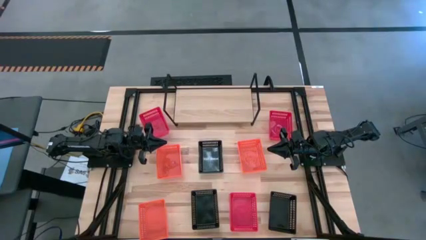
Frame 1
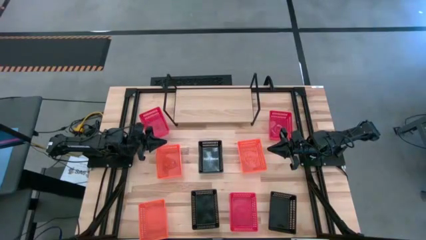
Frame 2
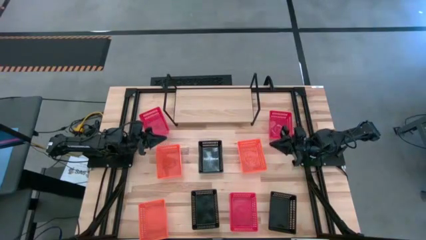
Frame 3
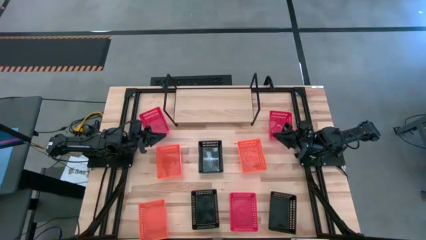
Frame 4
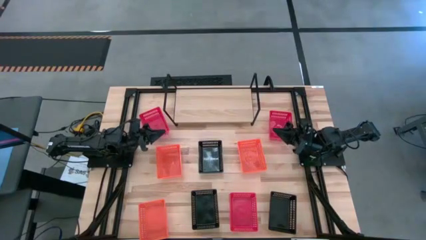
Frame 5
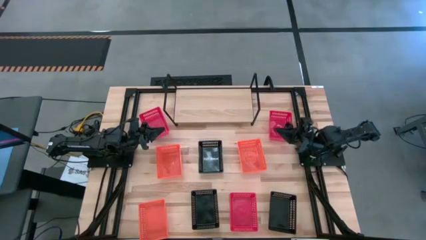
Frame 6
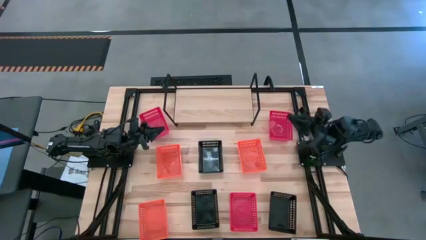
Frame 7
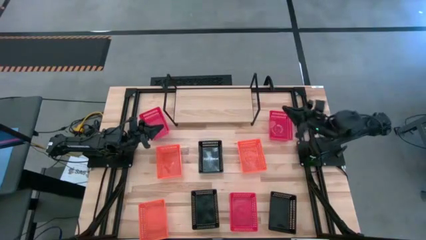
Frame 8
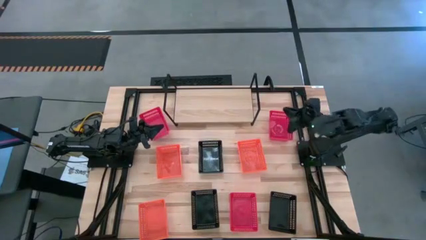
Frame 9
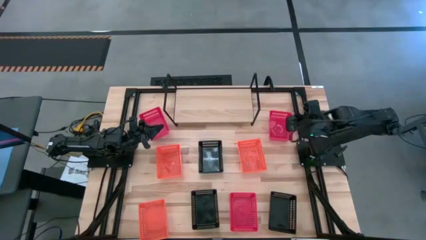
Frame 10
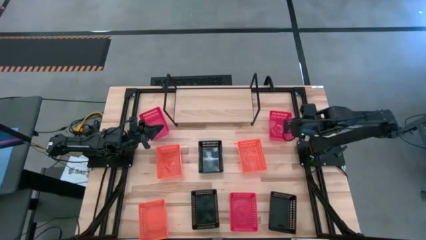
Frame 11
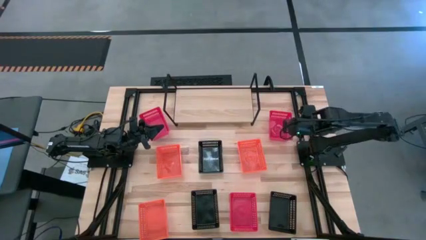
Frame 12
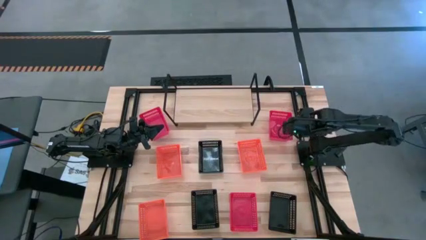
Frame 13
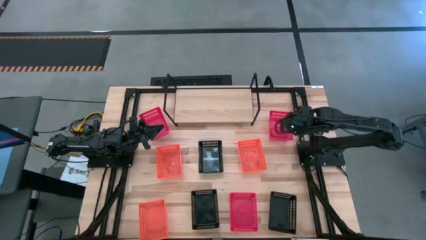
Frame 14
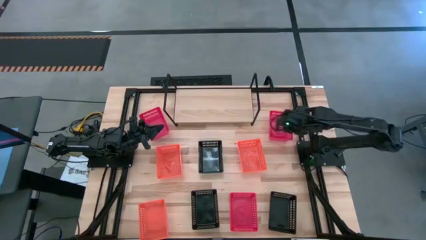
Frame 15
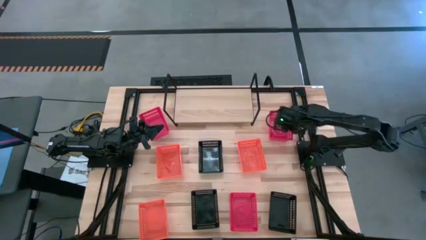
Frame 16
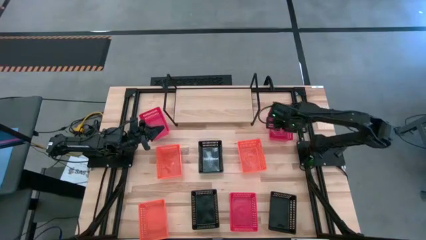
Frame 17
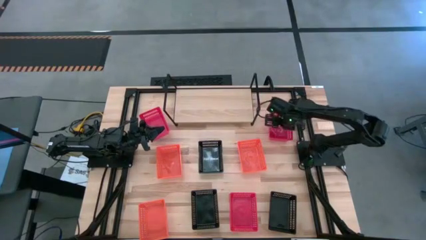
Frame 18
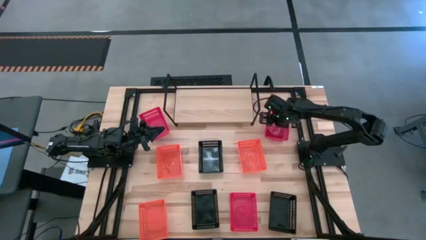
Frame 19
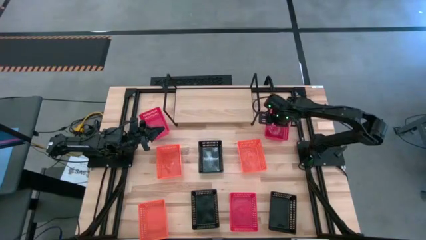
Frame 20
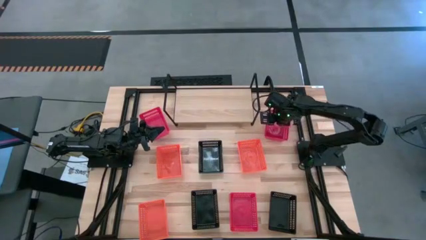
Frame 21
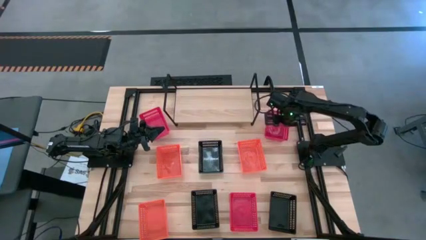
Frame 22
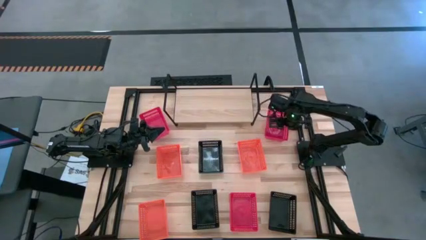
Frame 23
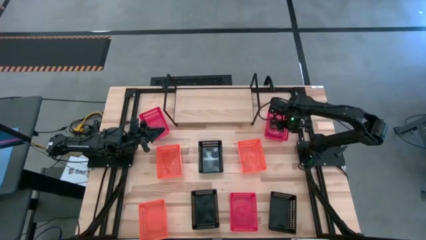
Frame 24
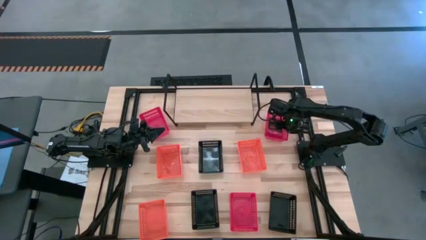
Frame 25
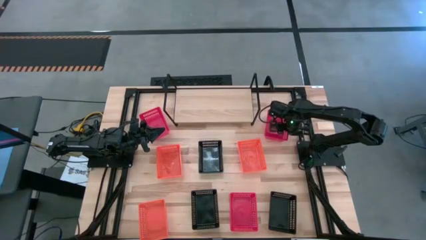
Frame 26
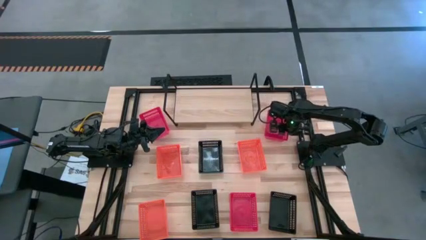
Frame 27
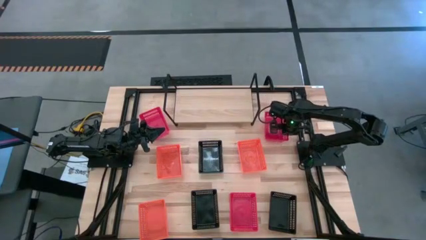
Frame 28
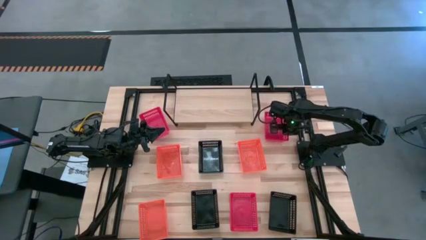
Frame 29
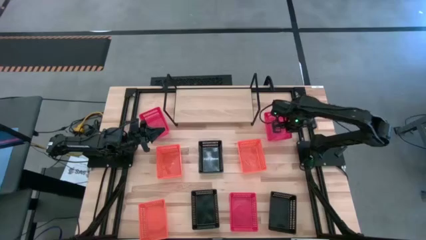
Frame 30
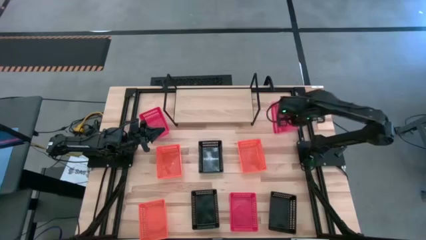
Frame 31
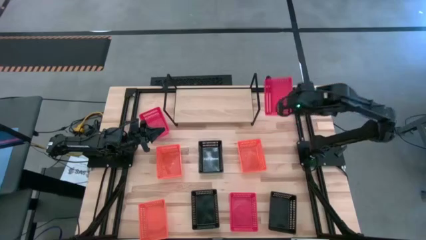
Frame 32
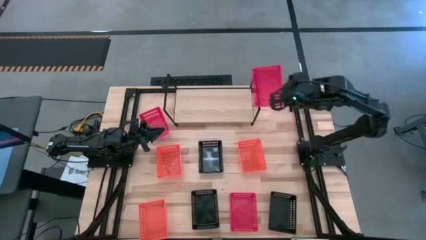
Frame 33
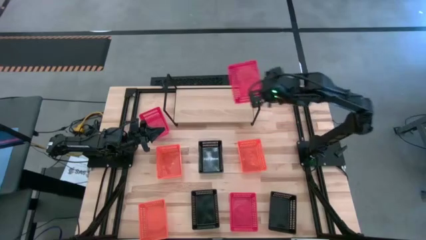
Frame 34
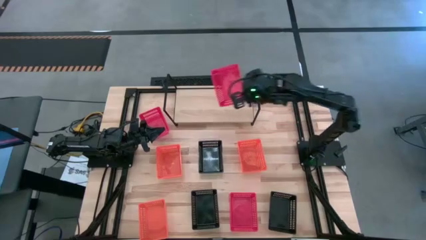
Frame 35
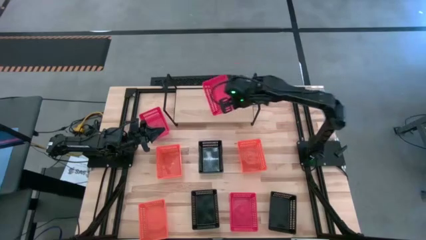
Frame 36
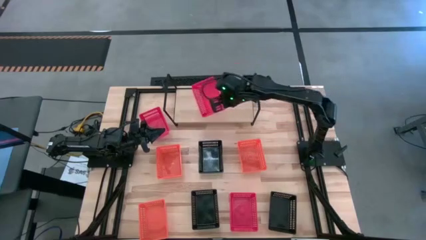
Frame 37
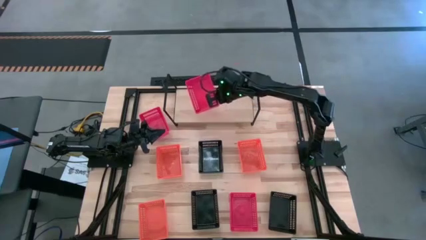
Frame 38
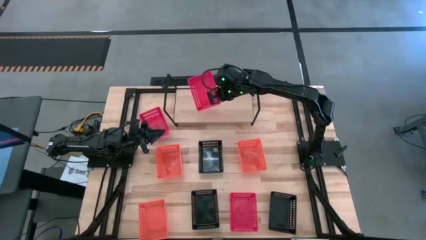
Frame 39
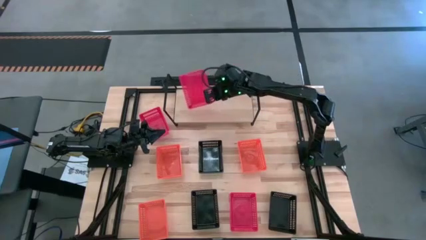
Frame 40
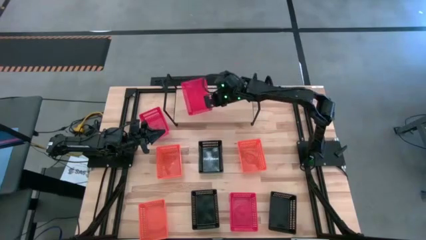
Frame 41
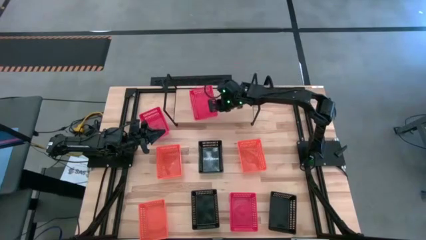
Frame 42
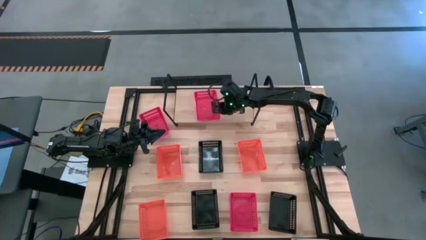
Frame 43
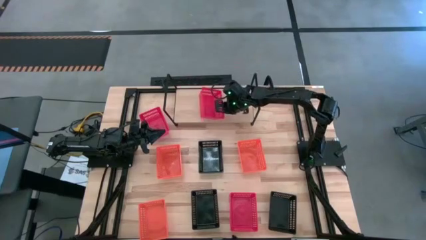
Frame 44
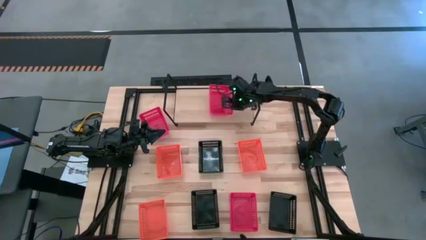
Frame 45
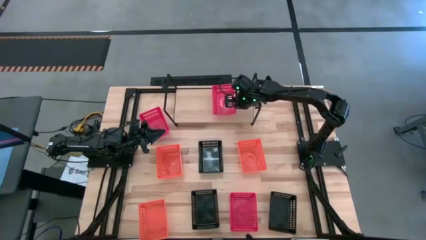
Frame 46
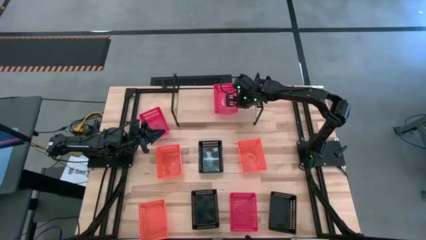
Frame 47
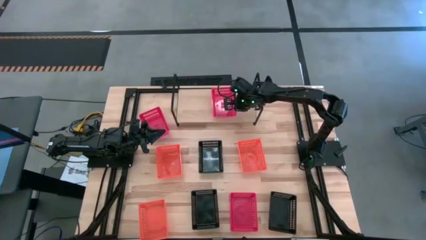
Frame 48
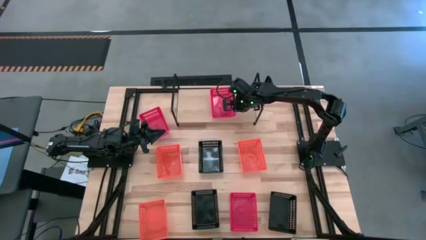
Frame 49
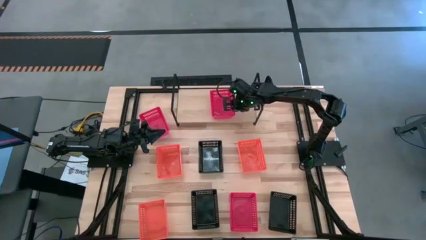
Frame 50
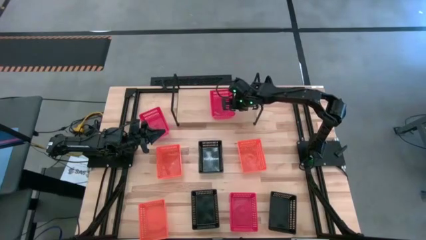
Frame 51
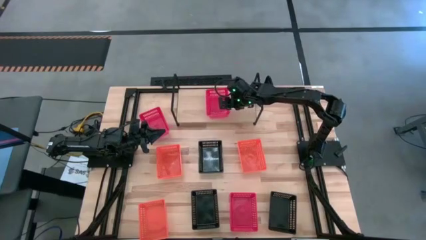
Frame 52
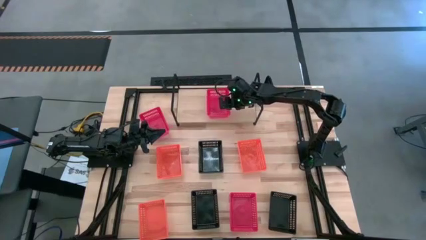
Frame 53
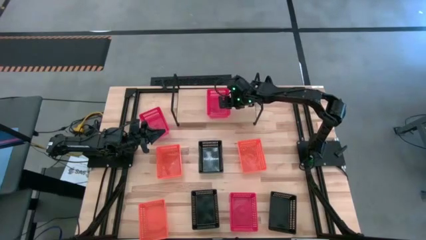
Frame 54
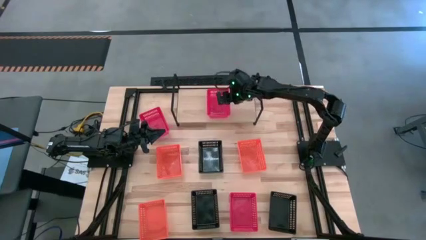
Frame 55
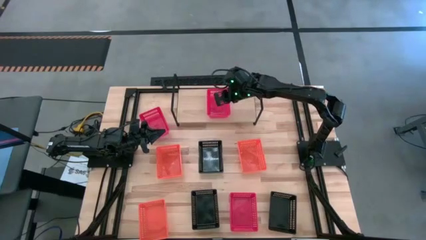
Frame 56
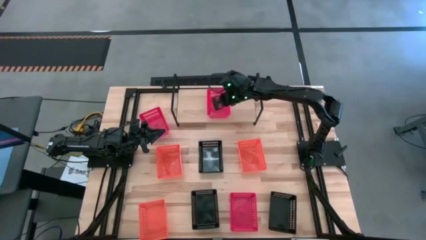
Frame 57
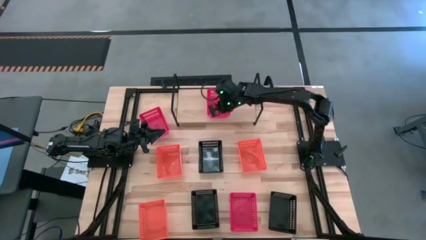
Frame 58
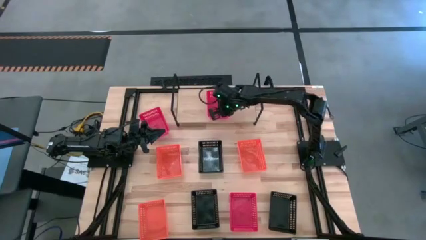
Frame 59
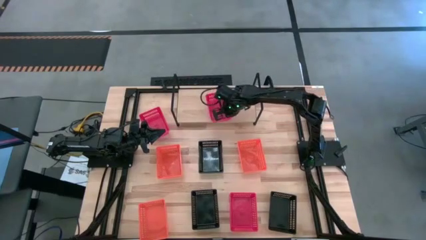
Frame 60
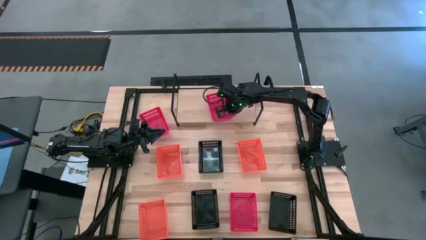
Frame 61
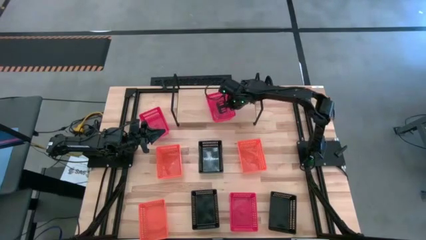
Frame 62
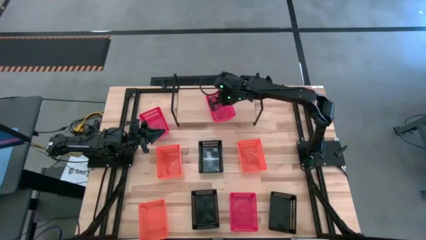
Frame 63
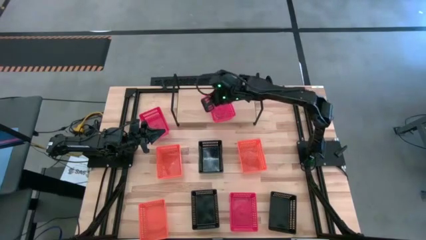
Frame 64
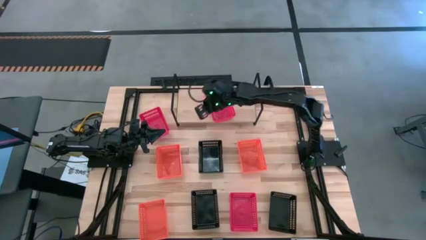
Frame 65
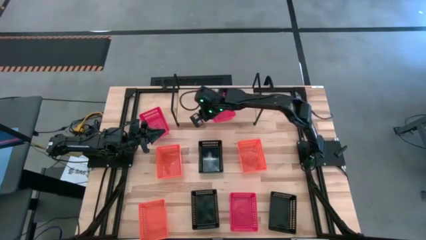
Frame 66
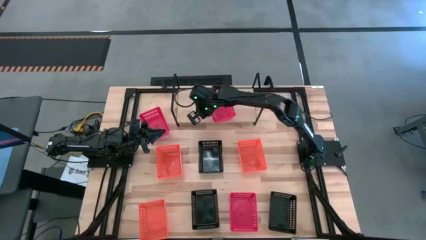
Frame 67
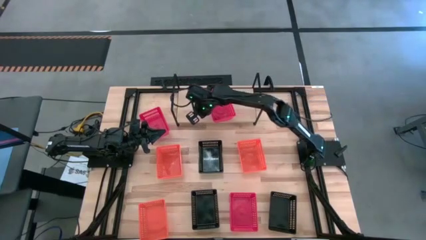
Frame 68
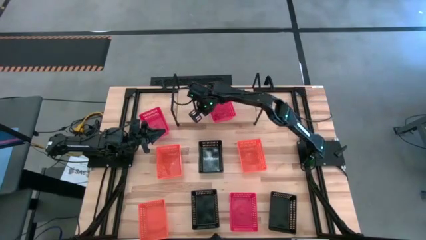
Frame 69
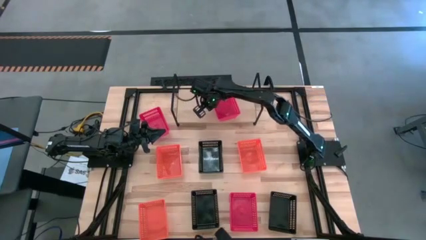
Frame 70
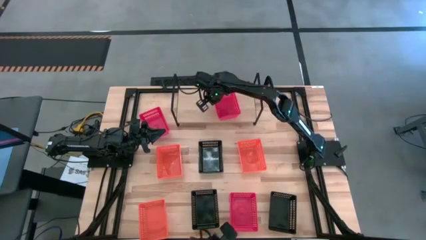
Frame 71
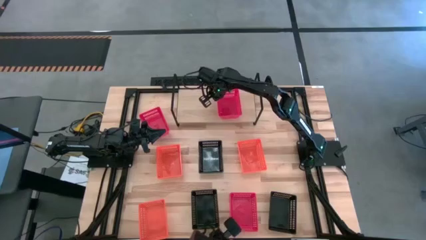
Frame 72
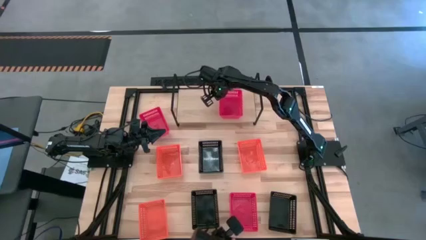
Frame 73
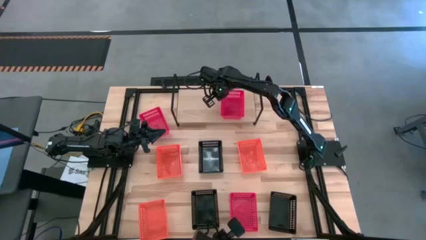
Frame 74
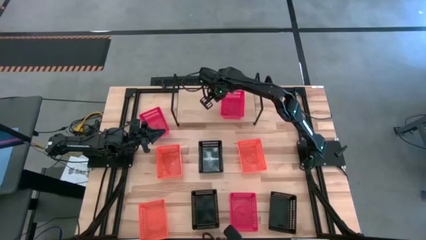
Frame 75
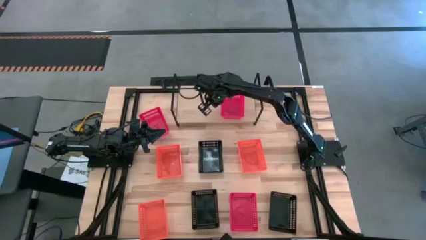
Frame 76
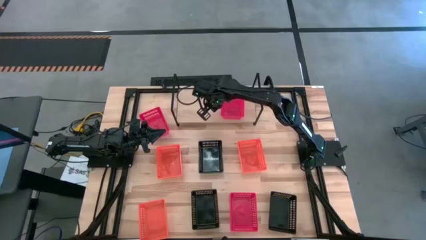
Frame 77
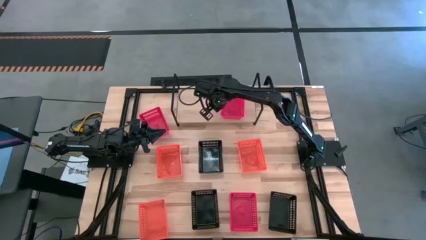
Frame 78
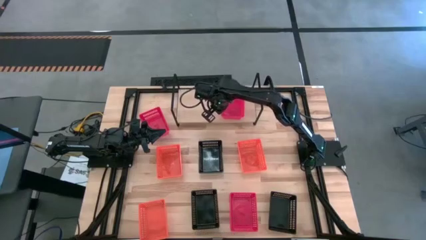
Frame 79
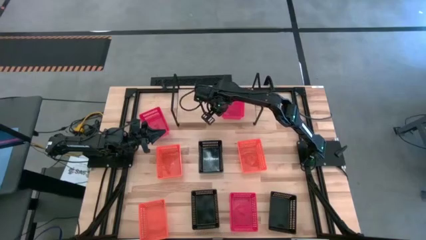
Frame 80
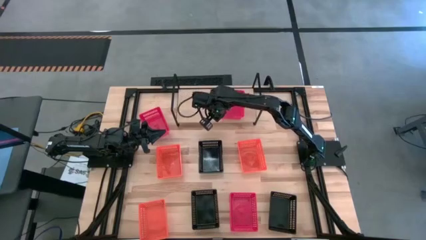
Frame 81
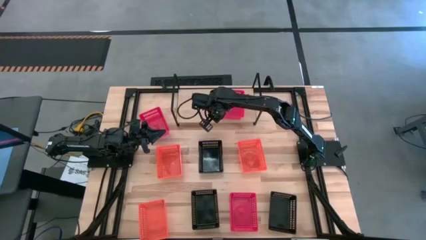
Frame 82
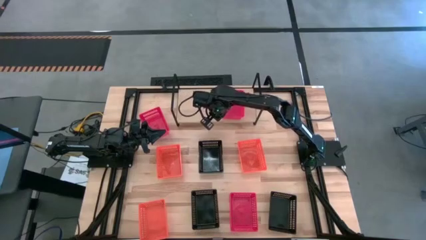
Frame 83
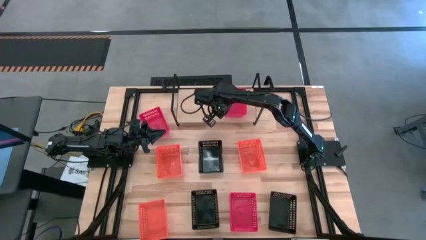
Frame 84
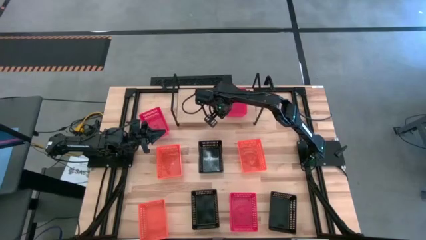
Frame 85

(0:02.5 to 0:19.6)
Task: Stack baskets on shelf by color
Put the top right red bin on the shelf
